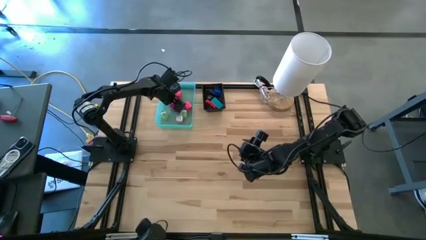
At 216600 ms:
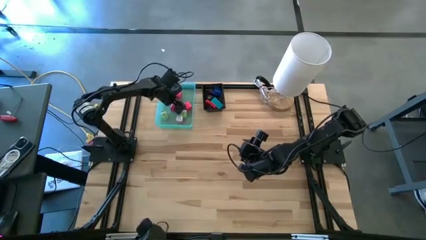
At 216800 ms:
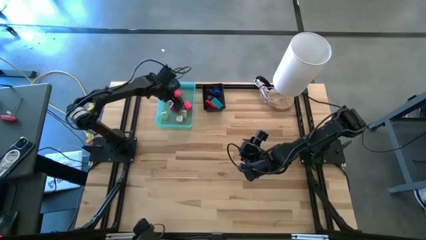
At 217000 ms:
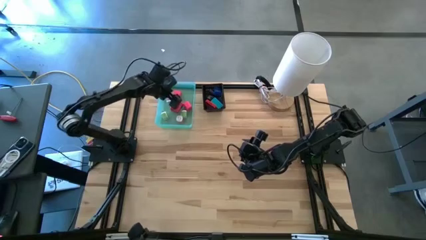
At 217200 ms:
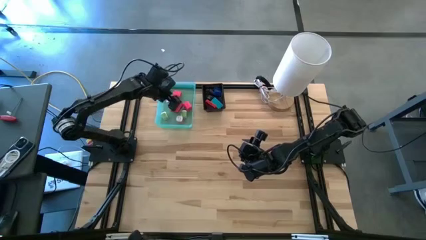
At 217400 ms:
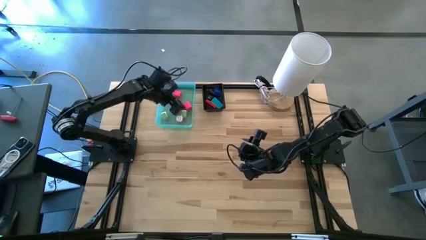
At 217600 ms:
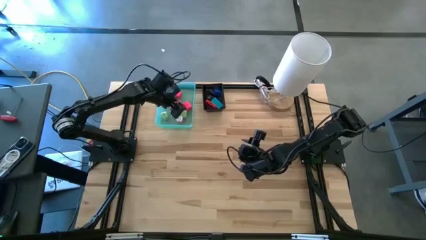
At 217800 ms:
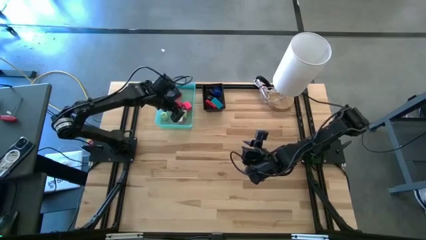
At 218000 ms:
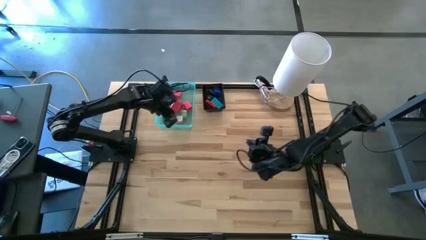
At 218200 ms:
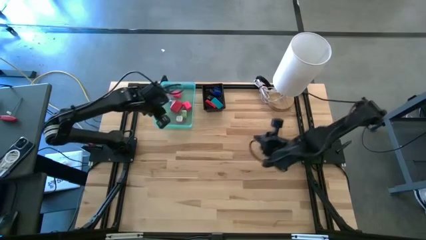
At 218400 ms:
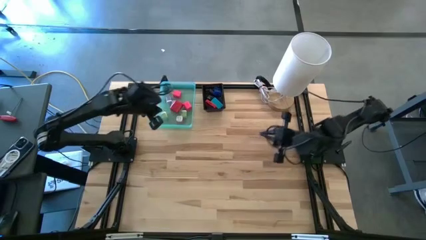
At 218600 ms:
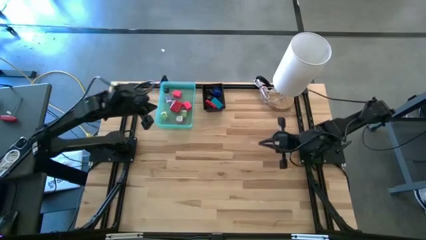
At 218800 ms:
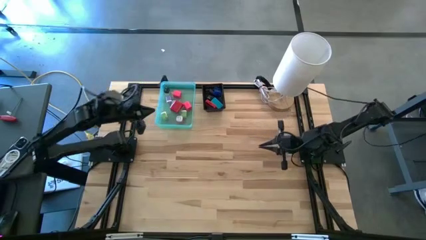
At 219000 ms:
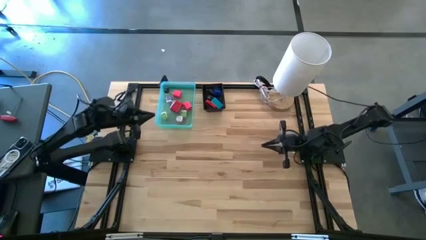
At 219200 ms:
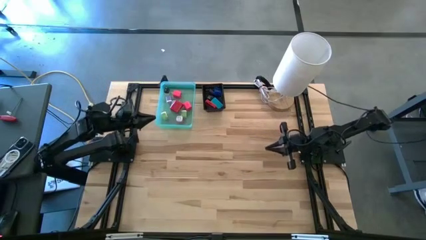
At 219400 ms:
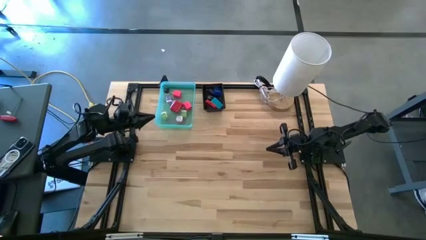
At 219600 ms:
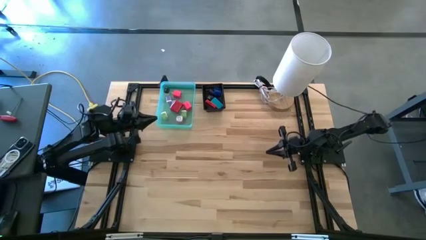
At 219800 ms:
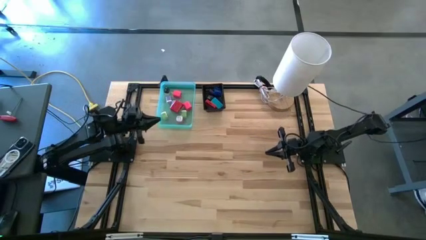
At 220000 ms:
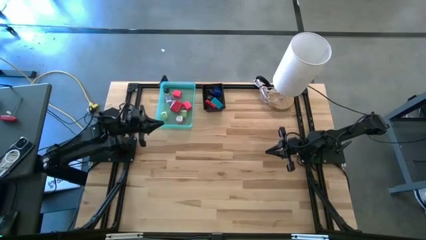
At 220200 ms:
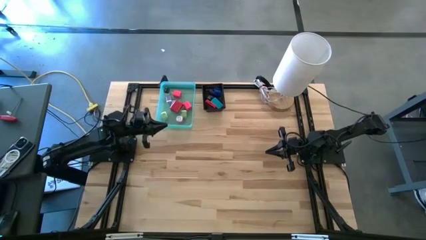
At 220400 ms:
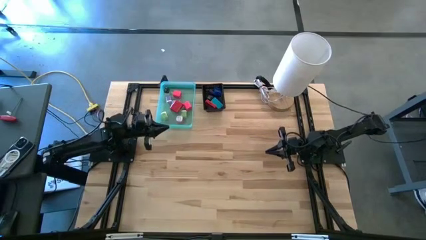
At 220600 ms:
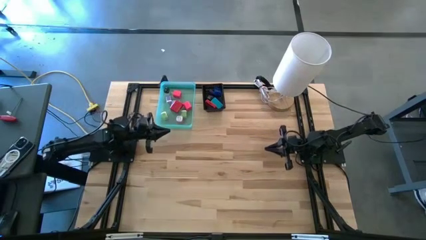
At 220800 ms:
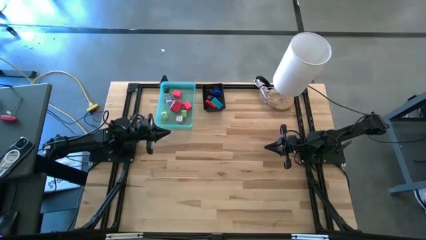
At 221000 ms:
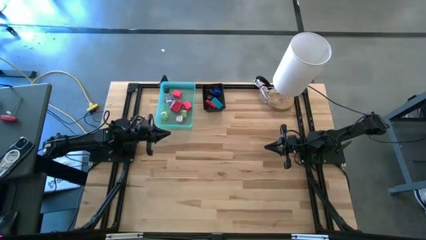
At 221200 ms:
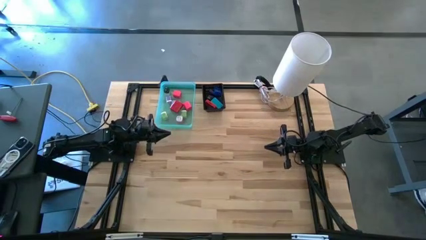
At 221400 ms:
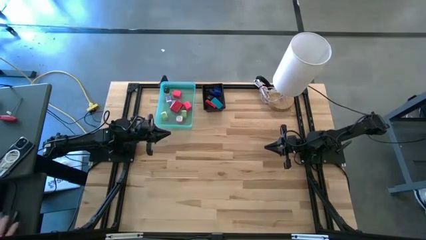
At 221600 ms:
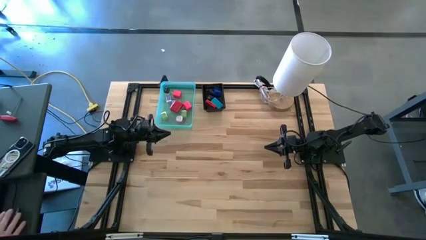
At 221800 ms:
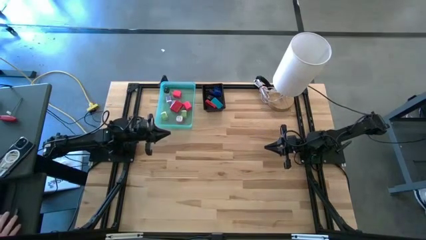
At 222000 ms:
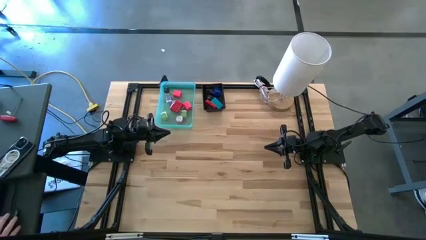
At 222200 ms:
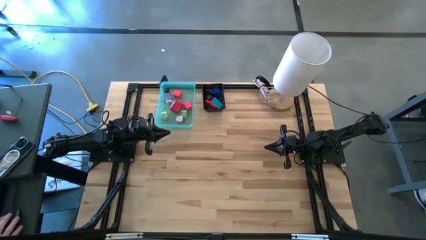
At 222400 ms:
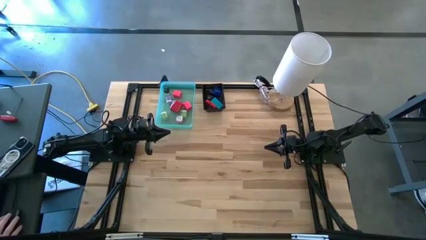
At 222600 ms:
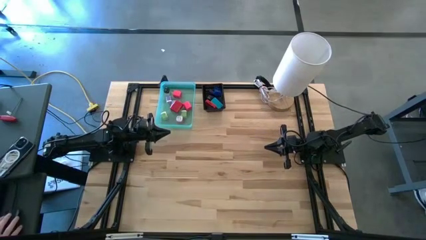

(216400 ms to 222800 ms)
Task: Pick & Place Office items
Return to Home Position

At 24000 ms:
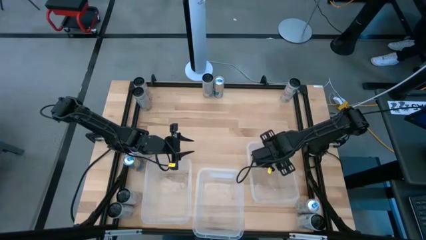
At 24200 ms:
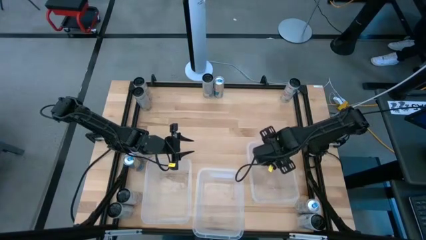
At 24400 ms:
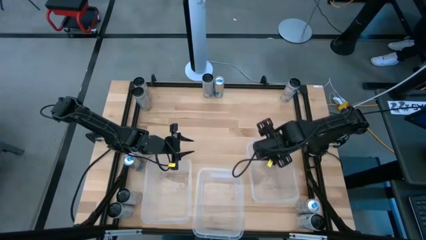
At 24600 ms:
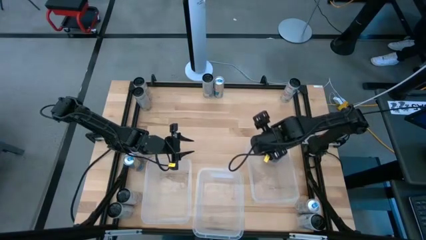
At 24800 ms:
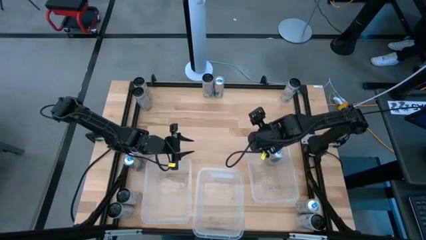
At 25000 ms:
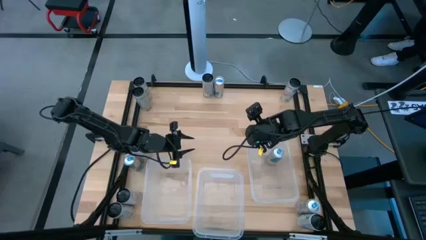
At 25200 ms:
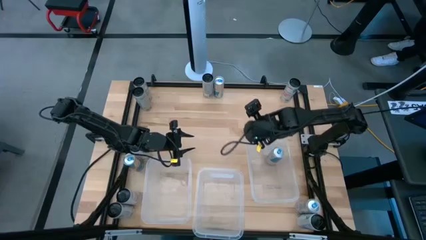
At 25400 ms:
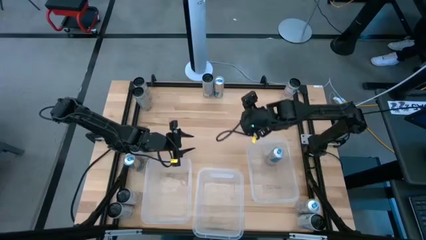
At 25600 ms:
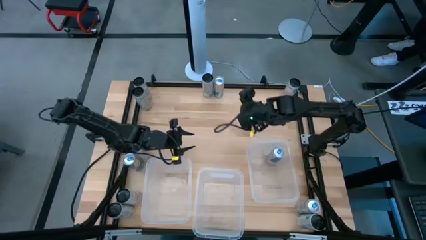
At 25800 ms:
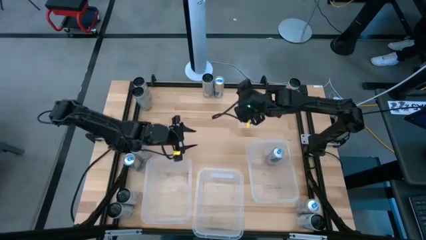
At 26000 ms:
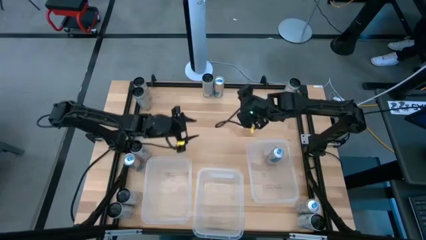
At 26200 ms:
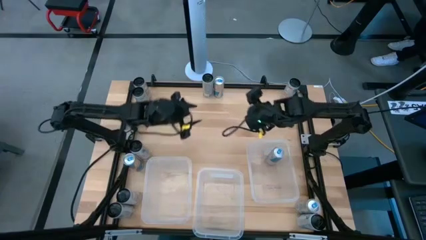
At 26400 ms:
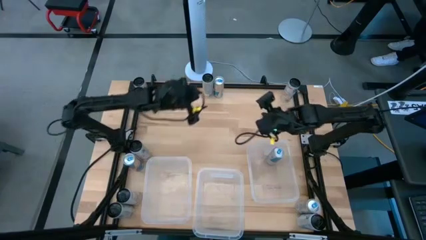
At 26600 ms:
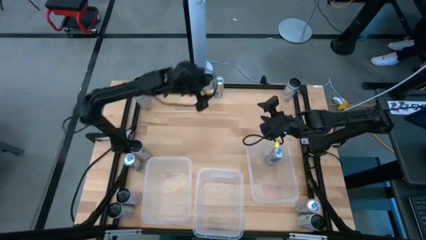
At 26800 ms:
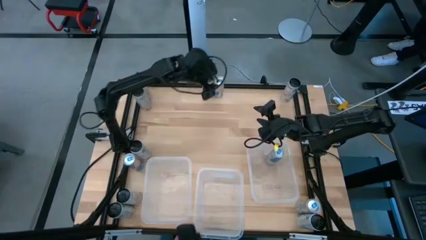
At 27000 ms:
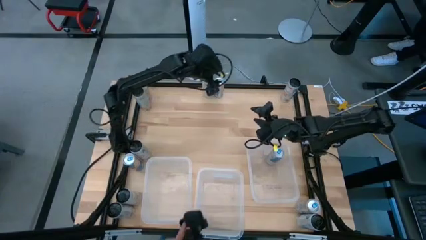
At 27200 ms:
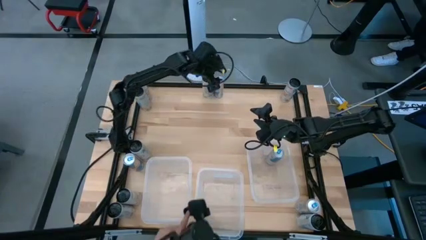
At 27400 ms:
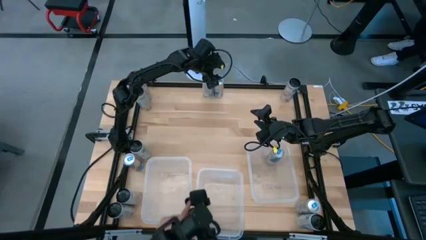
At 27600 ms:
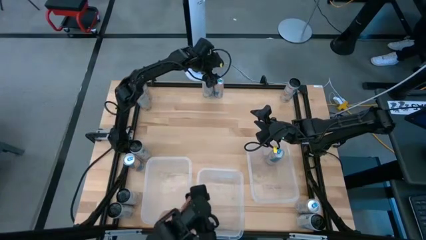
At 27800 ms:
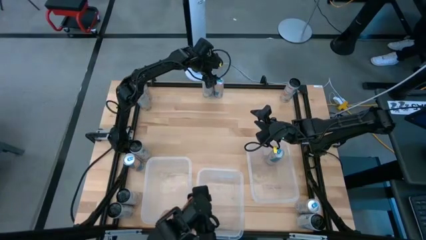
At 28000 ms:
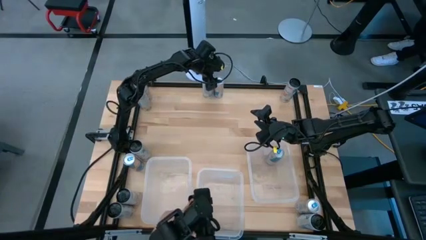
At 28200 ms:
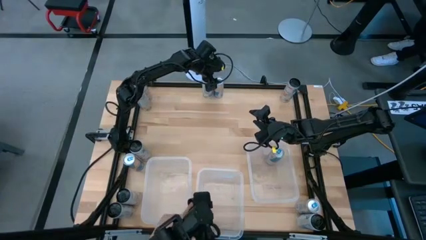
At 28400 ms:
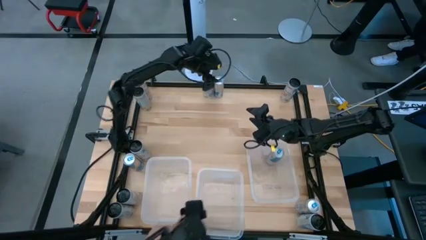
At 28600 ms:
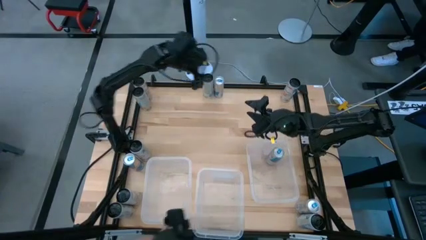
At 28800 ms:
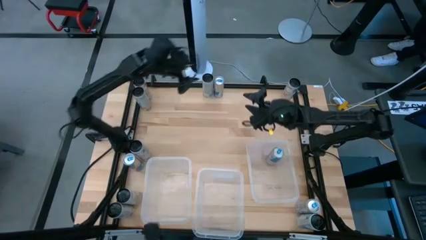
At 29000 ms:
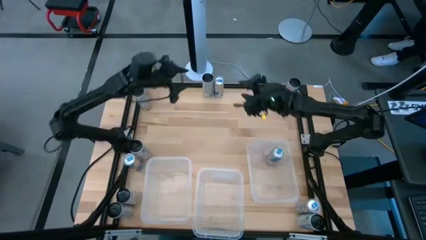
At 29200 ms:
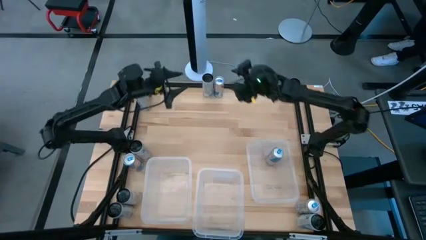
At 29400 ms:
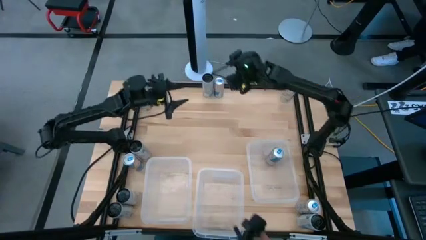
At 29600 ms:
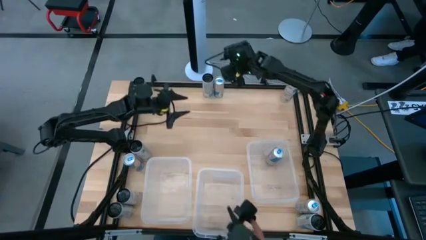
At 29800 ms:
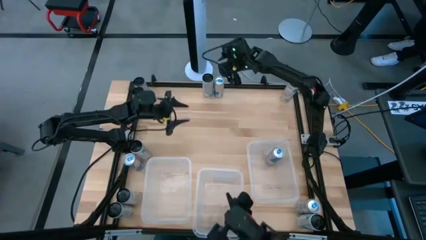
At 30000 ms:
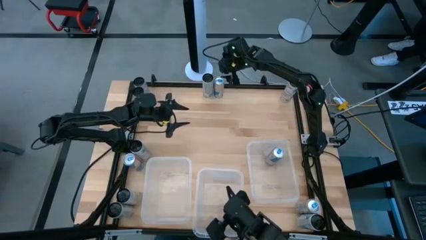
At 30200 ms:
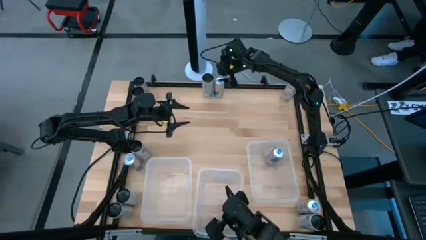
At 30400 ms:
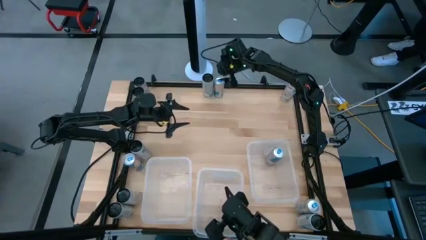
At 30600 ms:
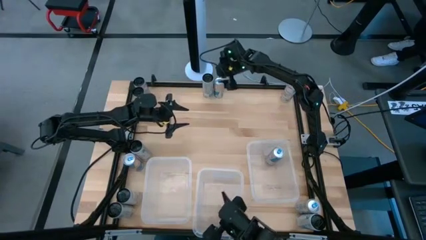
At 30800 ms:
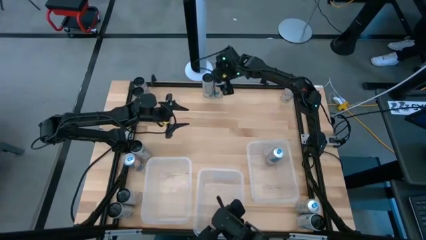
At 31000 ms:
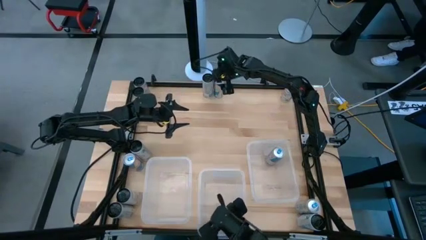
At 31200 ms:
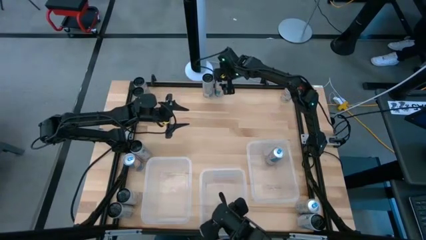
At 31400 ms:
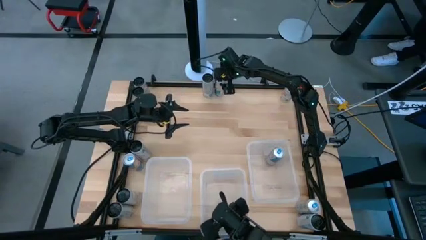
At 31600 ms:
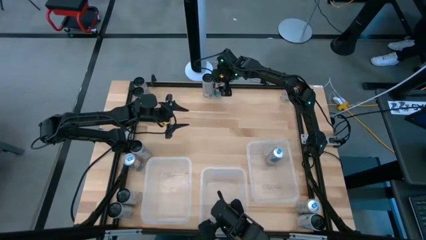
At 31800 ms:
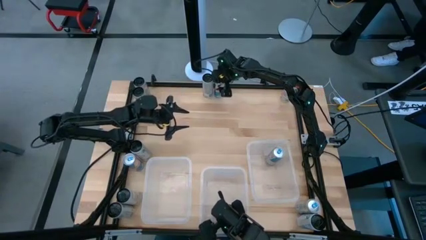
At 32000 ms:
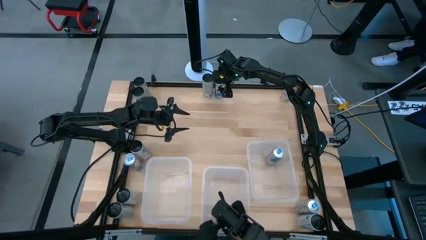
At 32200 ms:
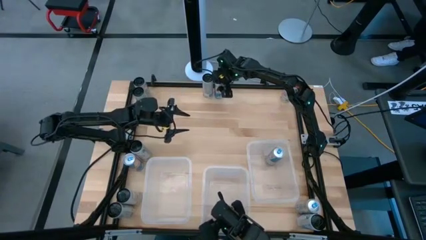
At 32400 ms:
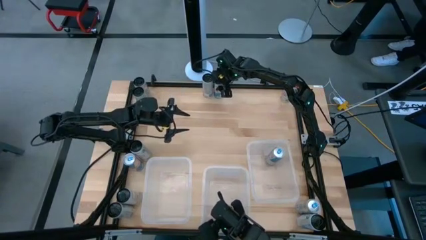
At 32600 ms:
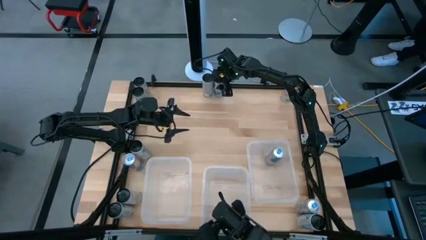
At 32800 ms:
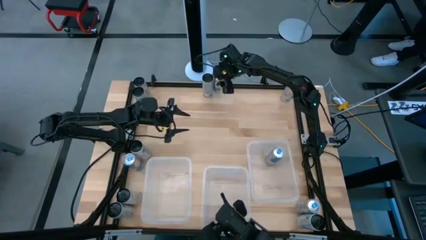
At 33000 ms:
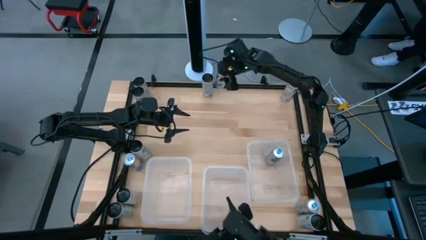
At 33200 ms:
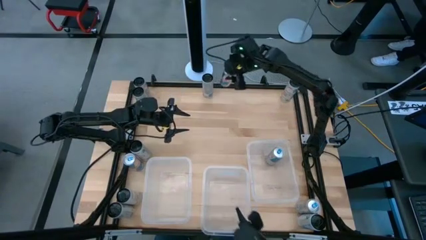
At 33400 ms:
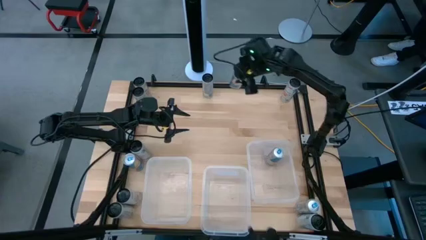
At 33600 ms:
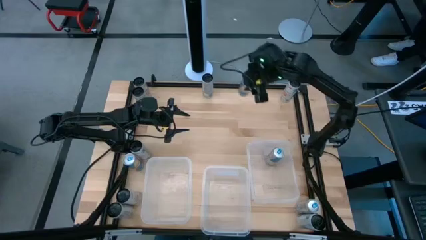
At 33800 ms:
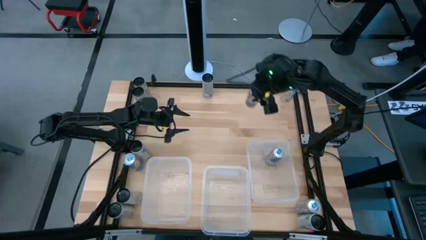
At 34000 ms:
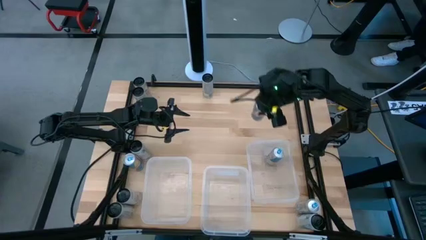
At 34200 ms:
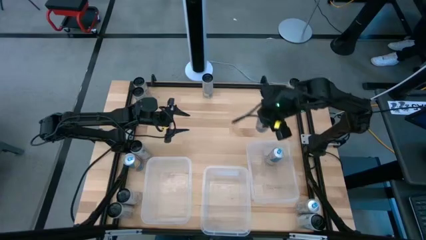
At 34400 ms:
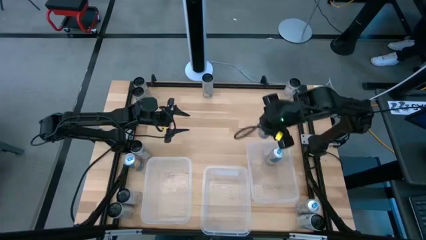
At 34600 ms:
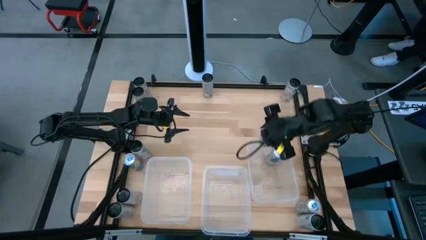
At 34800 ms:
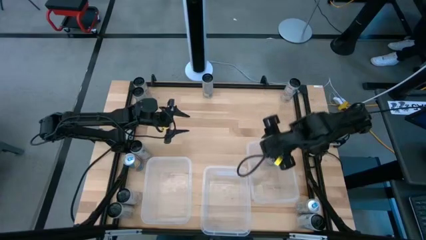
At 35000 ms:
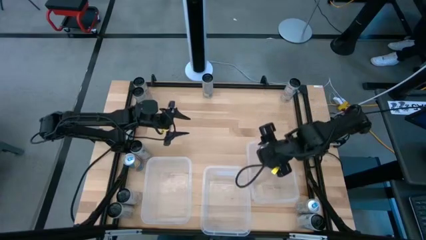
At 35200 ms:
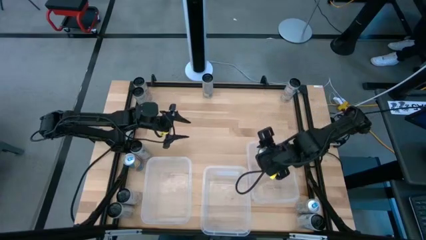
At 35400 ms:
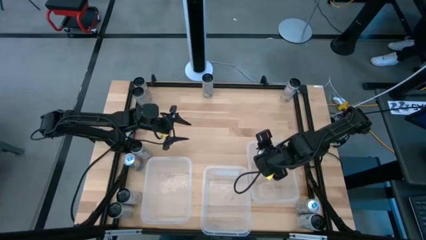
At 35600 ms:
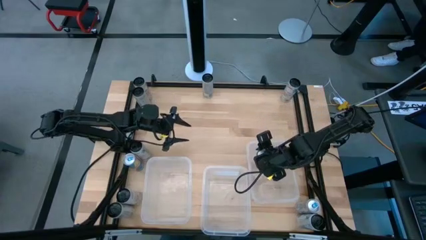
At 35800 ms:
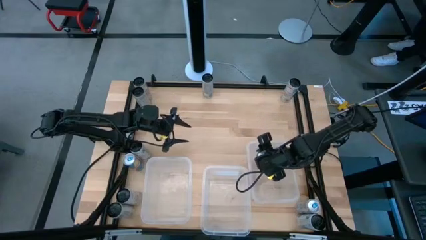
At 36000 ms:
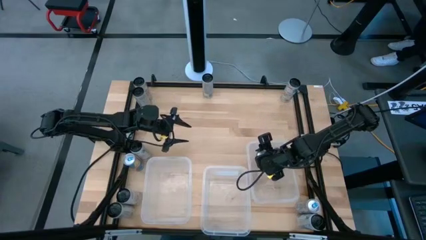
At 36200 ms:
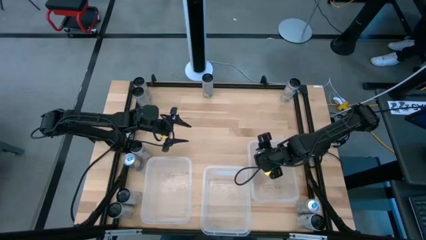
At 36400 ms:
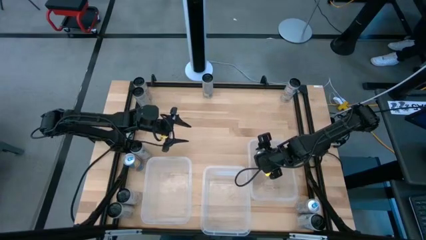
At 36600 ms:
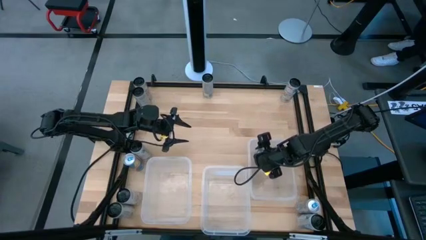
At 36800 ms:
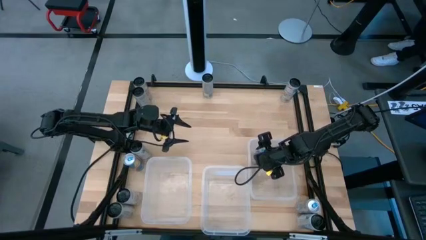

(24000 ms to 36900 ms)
Task: Sort soda cans
Put the top blue soda can into the right transparent bin
